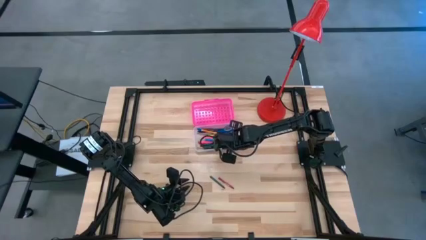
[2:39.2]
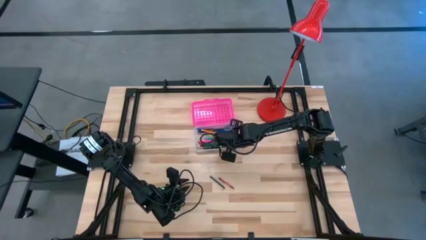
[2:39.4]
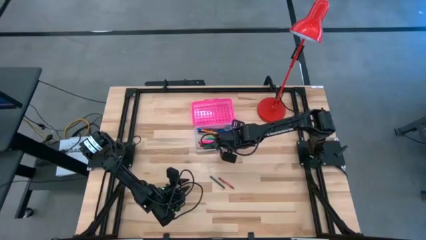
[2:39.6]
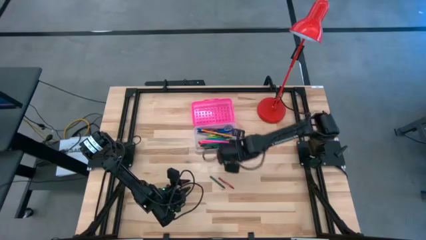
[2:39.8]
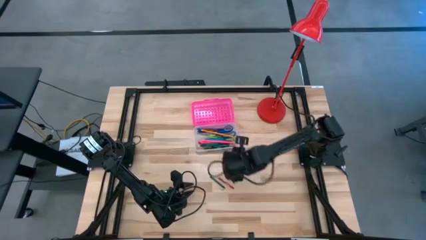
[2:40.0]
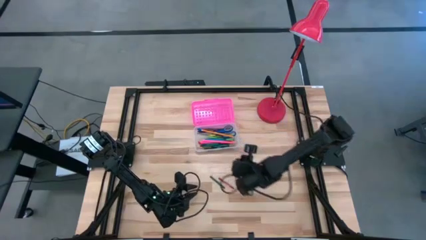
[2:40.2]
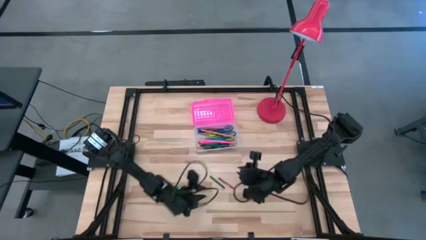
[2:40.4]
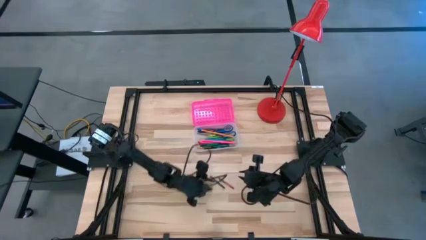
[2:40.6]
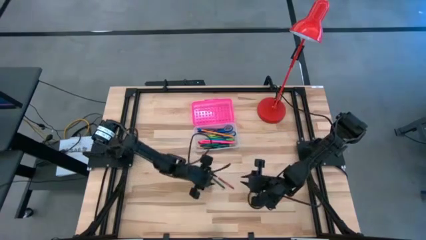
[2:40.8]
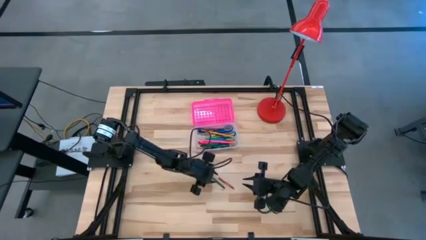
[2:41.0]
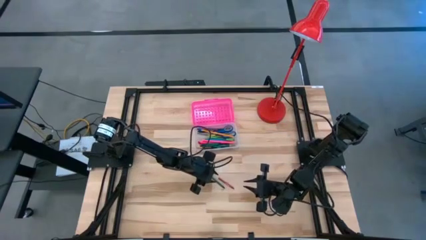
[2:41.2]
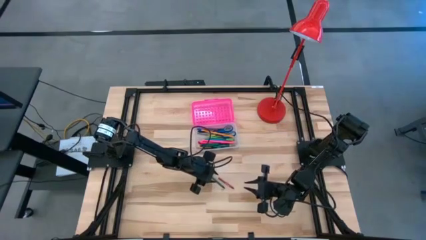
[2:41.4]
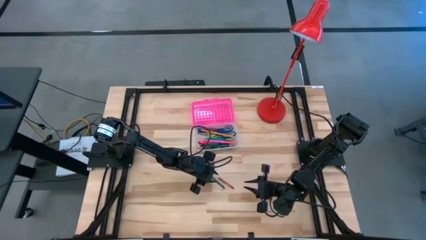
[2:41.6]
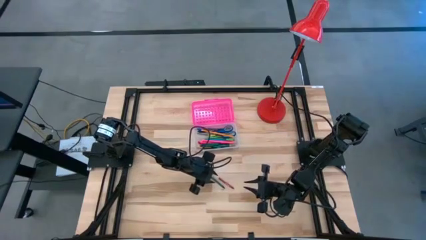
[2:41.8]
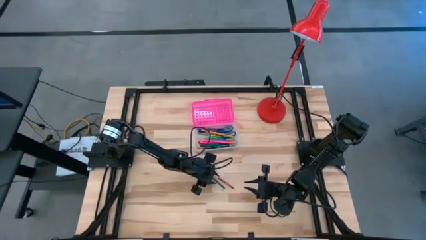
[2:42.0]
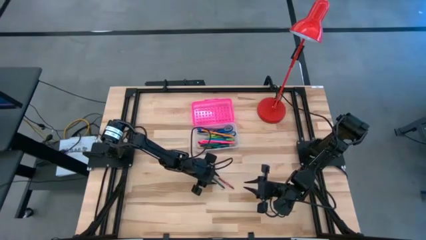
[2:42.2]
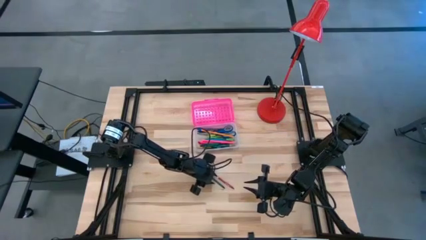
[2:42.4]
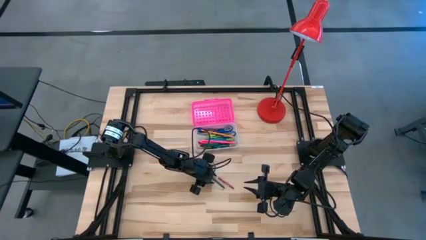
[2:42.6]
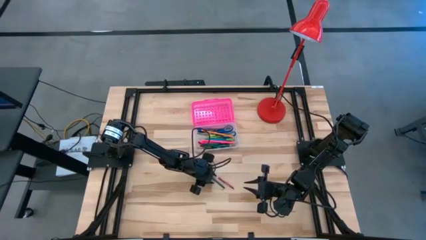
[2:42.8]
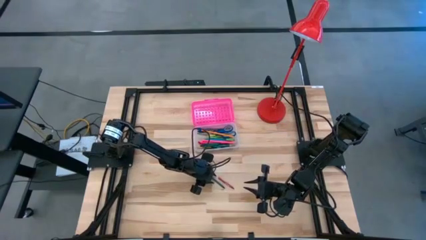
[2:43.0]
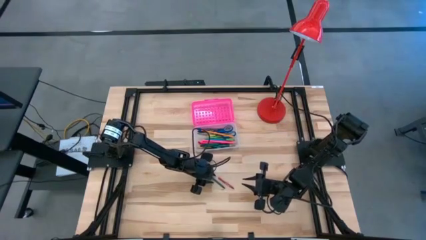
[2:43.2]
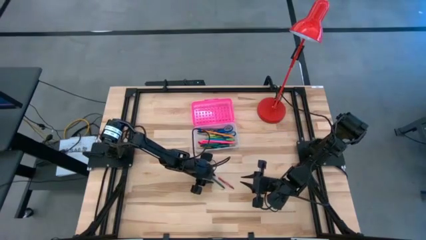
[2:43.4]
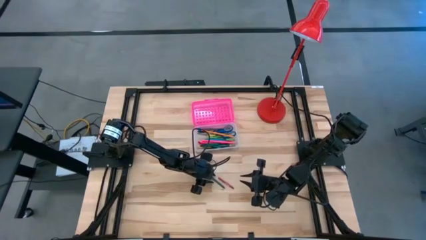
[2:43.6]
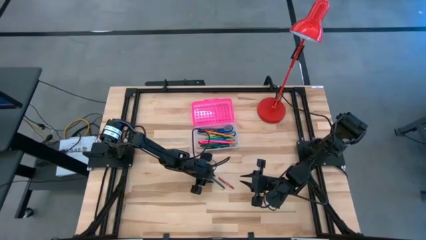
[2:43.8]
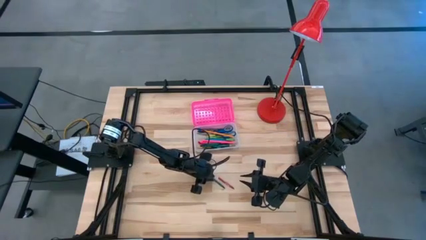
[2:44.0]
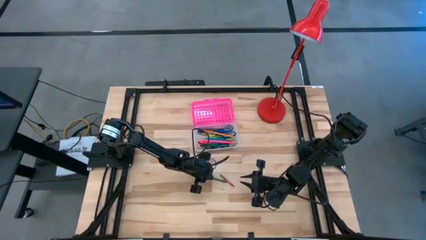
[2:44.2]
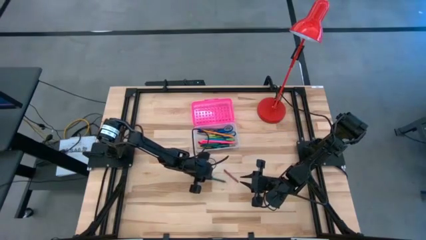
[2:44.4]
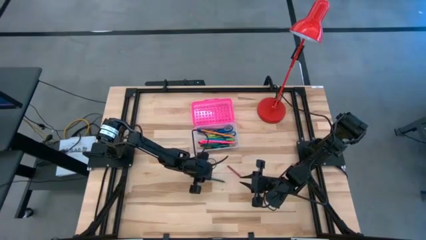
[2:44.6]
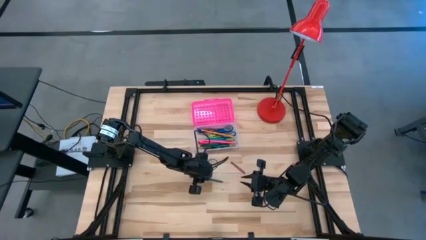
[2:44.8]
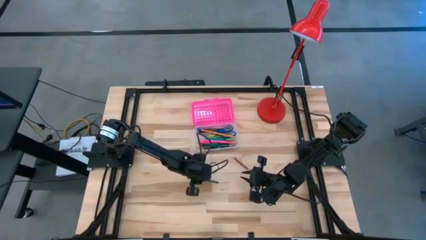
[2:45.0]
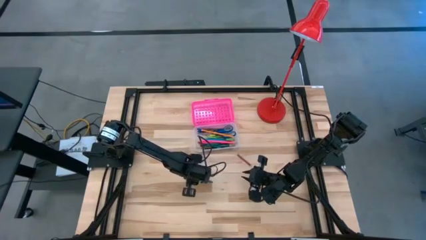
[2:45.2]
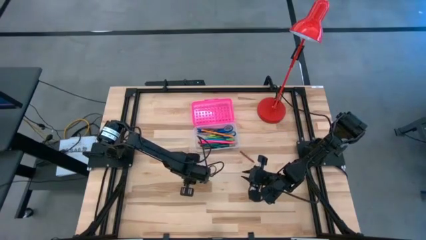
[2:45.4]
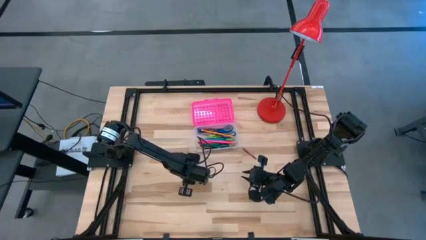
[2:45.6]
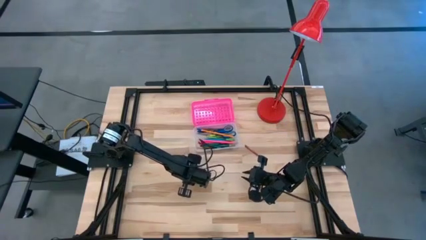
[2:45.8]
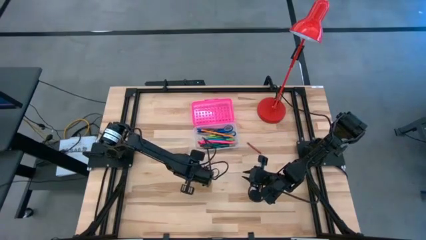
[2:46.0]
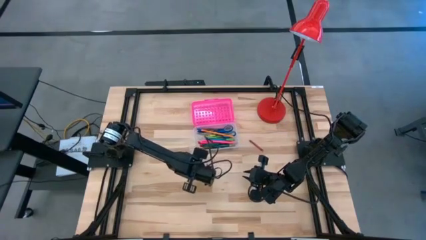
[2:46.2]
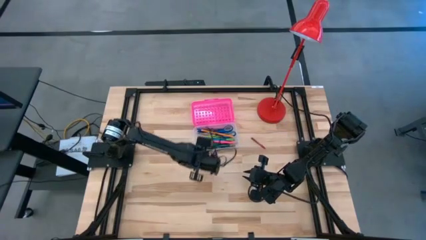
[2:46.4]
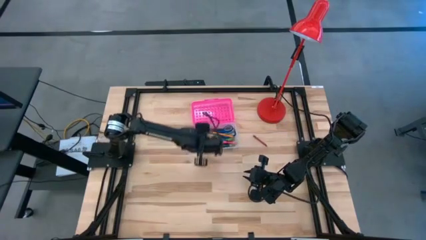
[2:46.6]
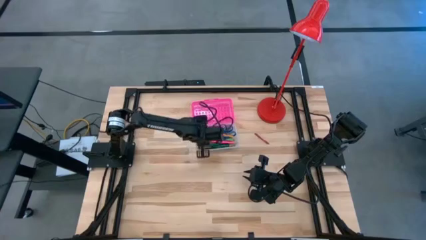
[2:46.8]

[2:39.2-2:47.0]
Task: Pick & place school supplies into a supply box
Put the green crayon into the pink supply box

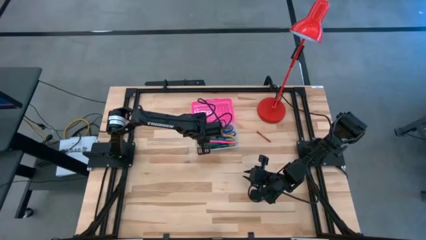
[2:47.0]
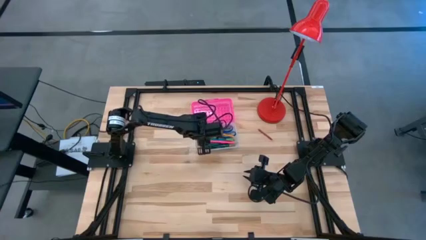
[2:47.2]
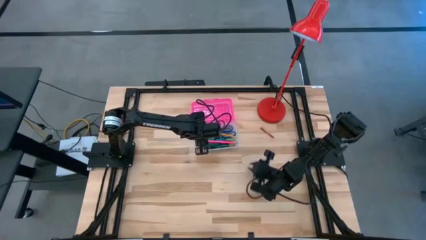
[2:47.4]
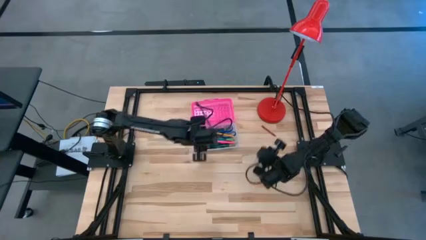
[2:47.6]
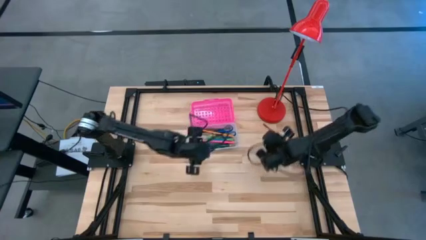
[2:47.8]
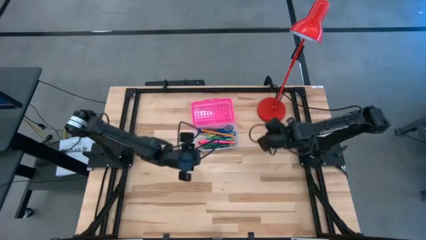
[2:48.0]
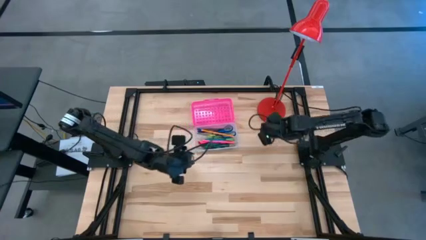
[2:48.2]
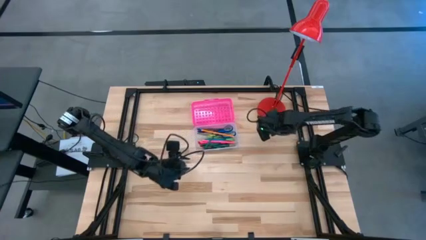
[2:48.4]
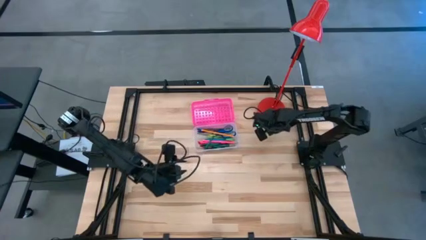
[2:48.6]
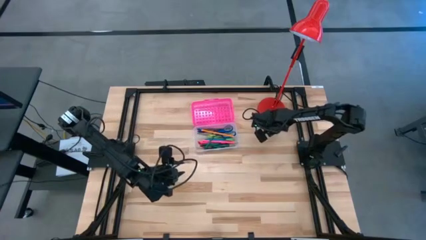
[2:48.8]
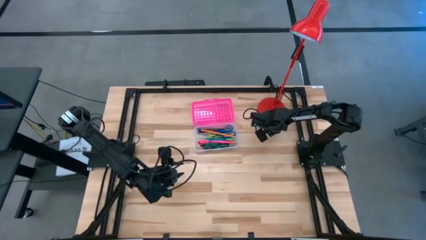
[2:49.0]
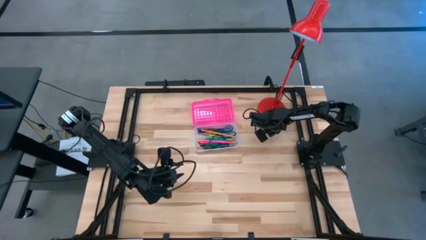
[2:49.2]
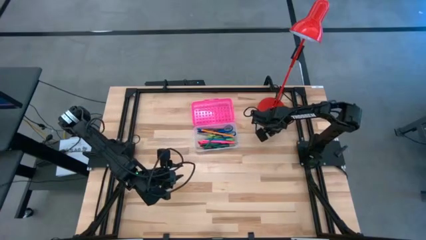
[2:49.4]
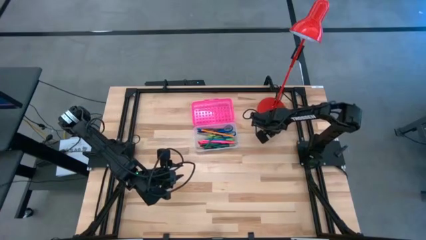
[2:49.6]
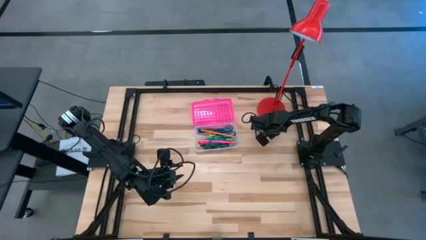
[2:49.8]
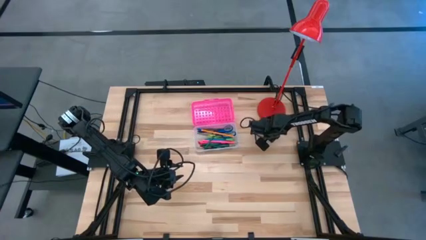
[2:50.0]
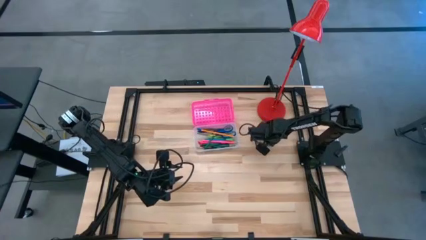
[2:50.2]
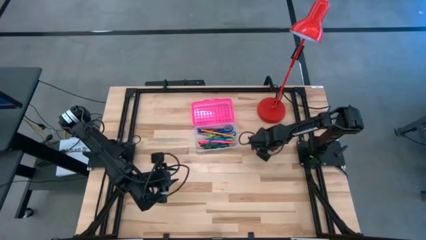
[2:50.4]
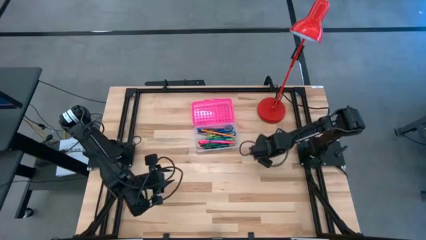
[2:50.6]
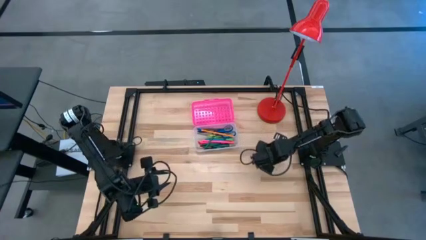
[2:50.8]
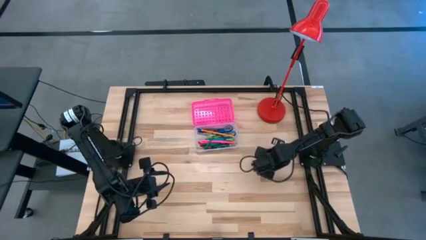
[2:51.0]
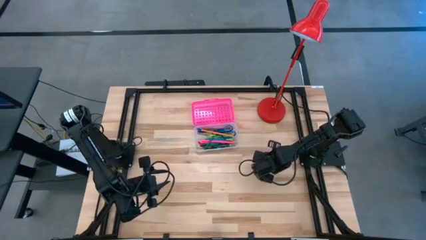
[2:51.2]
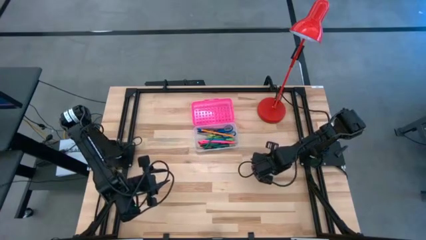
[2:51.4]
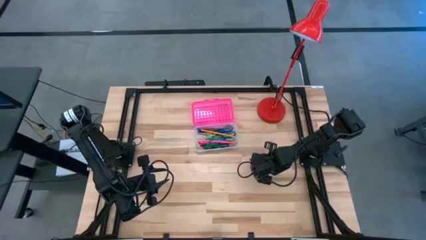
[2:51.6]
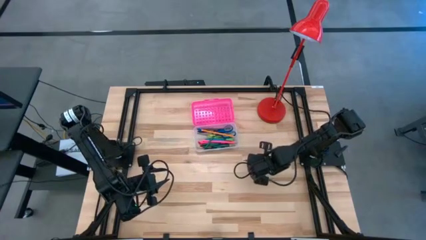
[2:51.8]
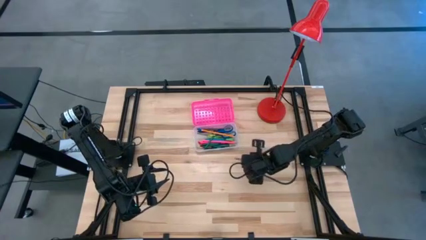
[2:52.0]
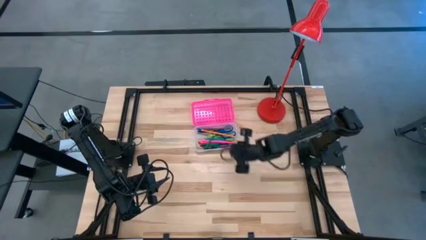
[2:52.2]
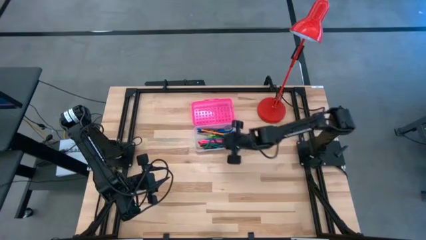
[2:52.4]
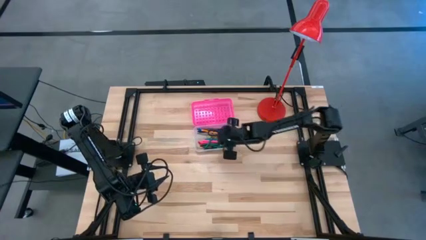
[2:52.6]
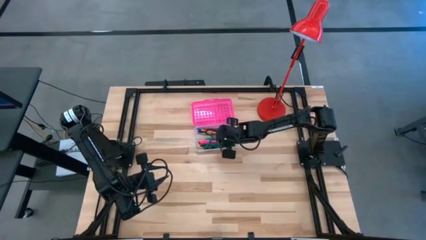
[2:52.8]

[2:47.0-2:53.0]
Put the red crayon into the pink supply box

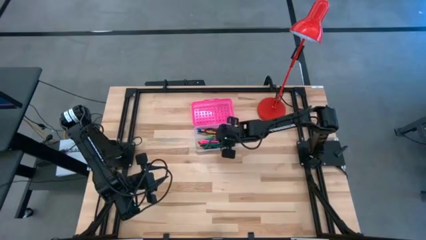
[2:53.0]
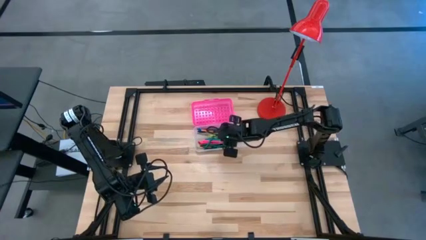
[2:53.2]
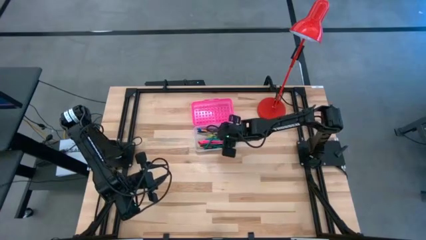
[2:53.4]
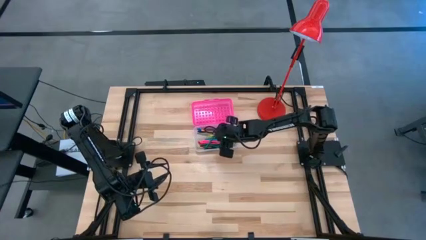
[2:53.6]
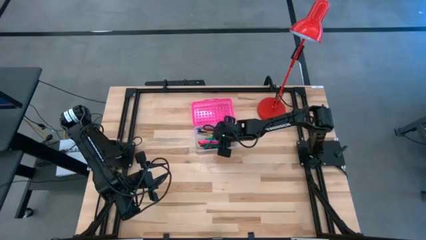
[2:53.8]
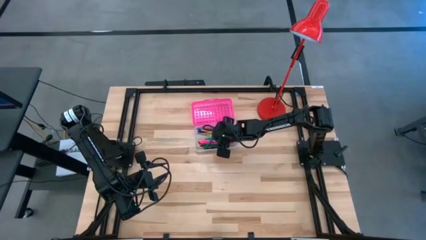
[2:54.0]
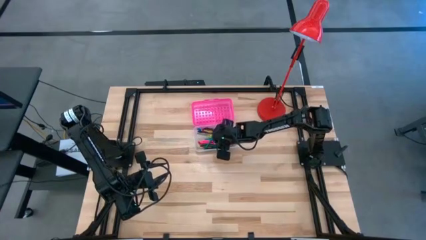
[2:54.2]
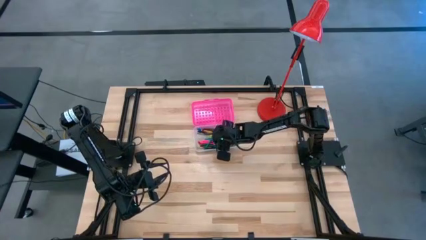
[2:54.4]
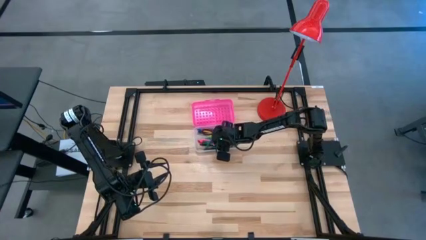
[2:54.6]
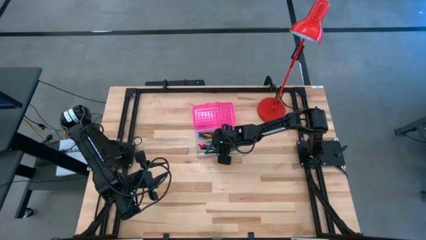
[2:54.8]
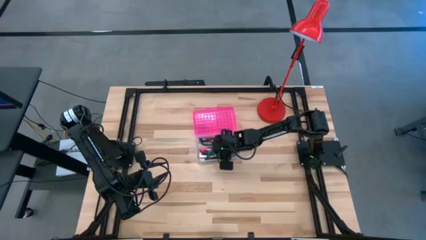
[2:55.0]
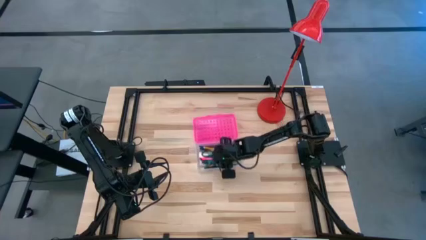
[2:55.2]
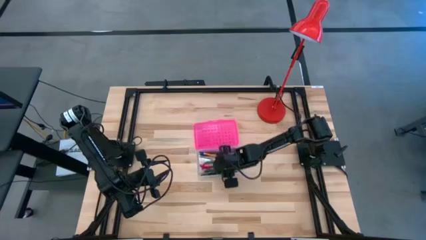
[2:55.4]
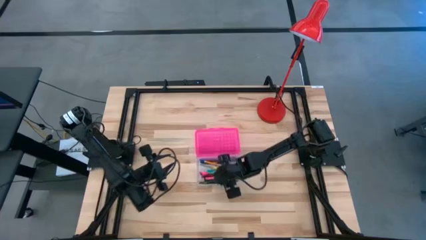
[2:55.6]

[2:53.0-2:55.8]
Move the pink supply box to the center of the table
